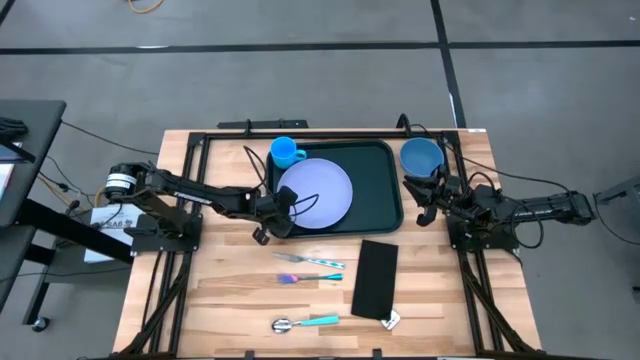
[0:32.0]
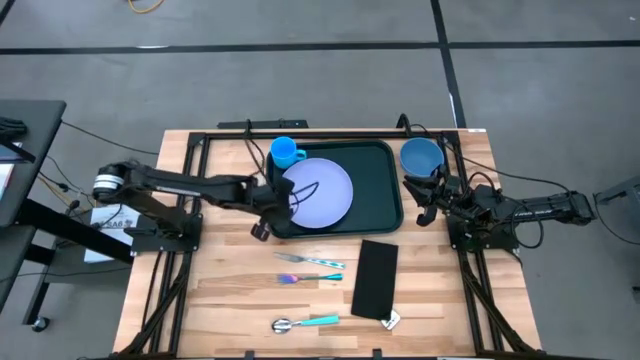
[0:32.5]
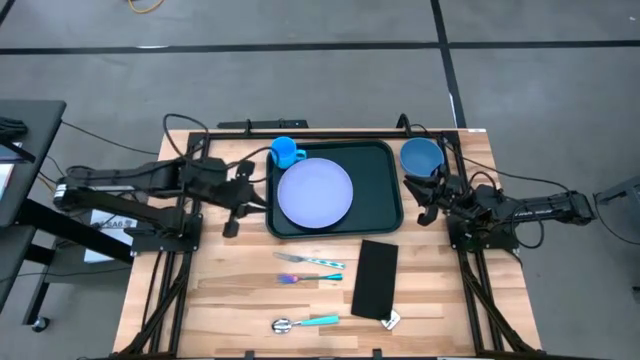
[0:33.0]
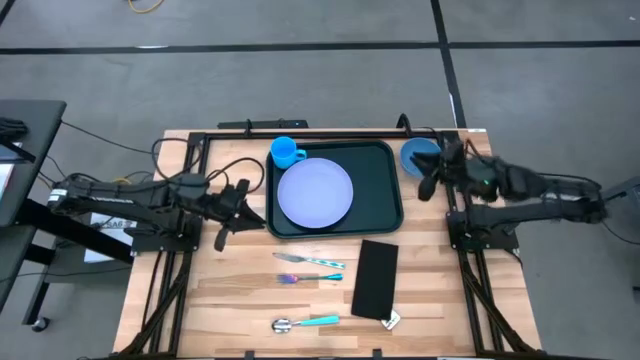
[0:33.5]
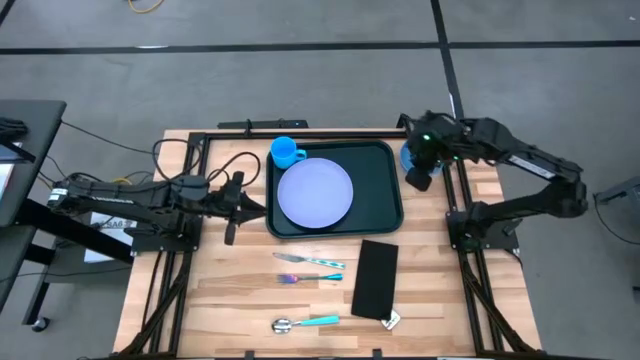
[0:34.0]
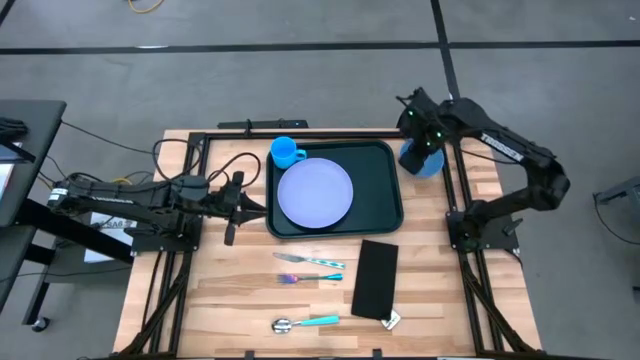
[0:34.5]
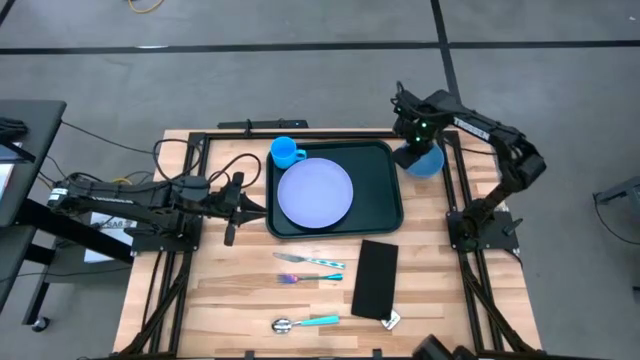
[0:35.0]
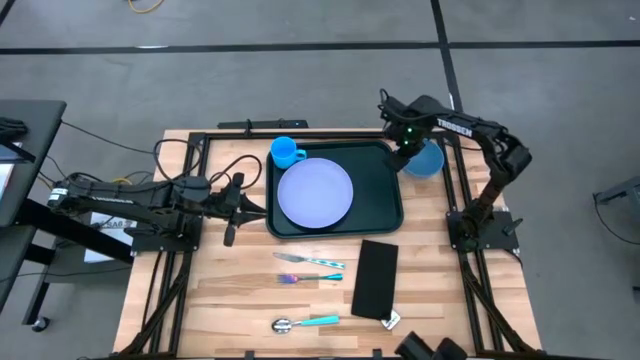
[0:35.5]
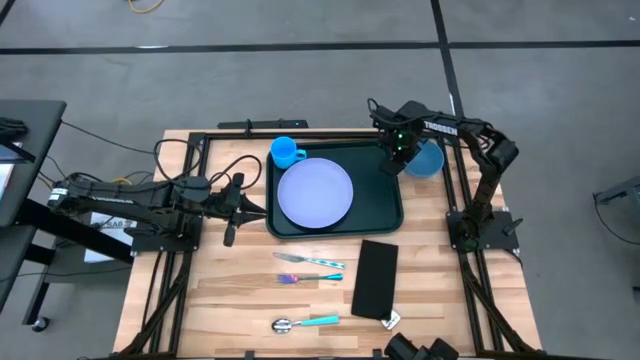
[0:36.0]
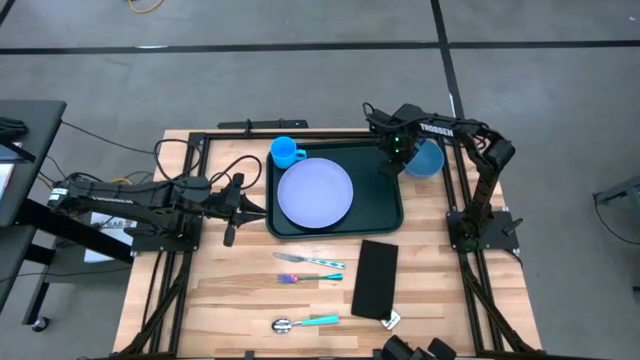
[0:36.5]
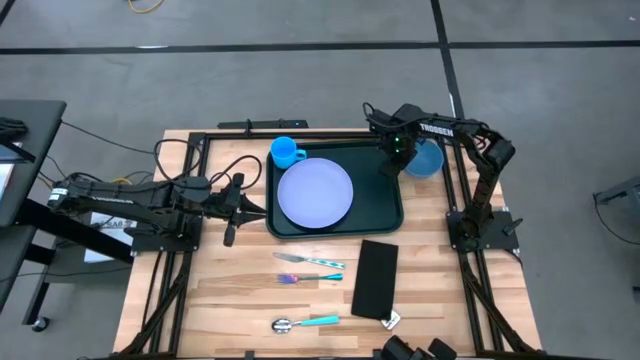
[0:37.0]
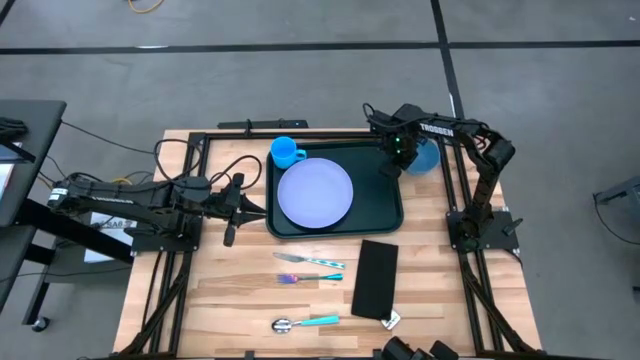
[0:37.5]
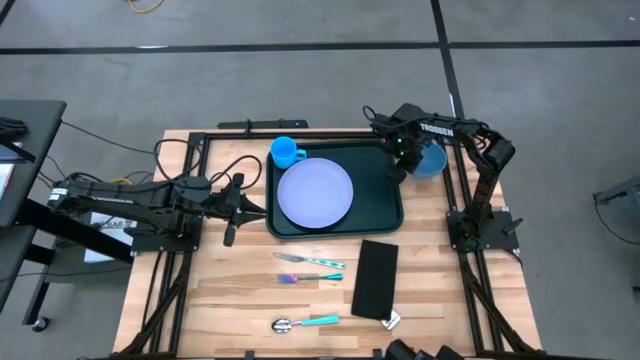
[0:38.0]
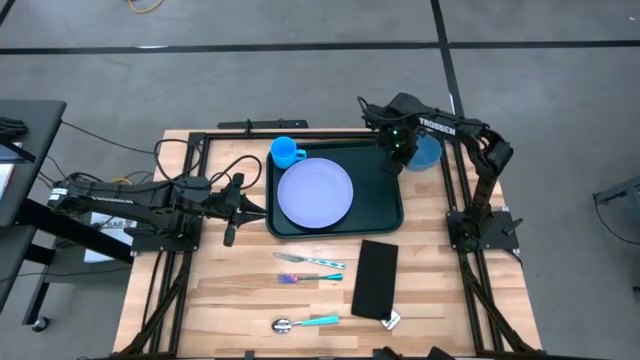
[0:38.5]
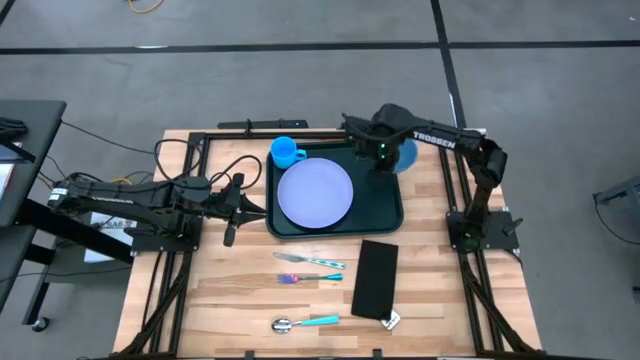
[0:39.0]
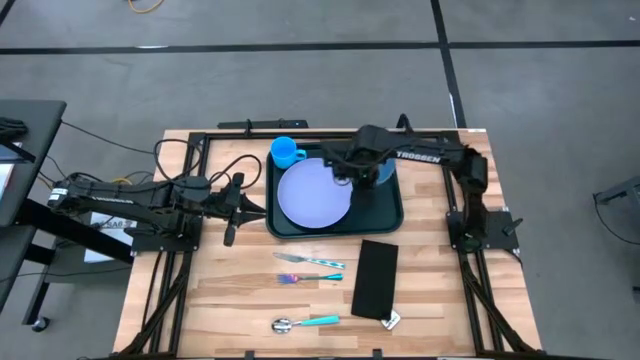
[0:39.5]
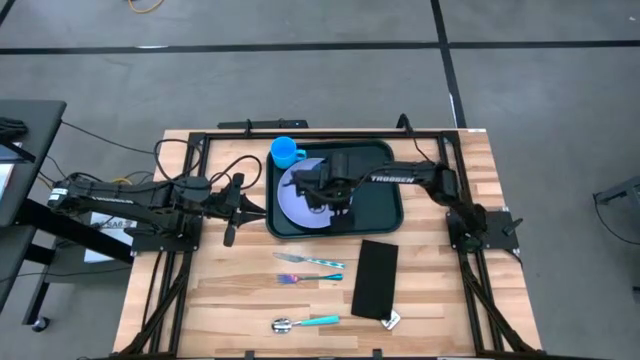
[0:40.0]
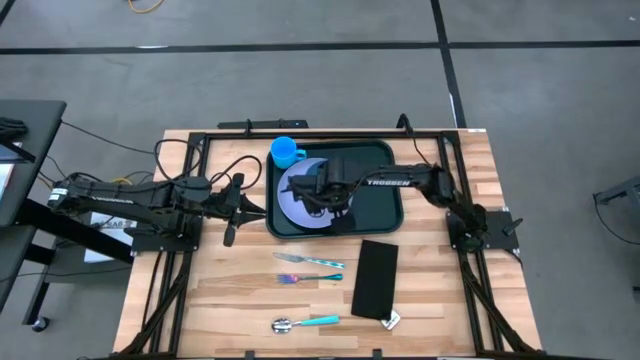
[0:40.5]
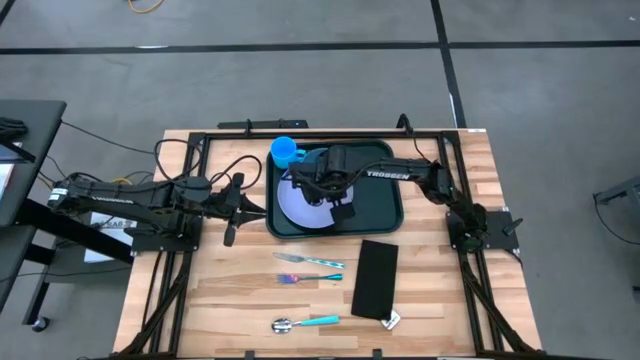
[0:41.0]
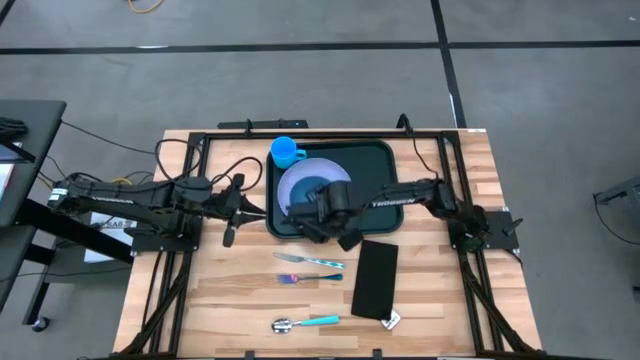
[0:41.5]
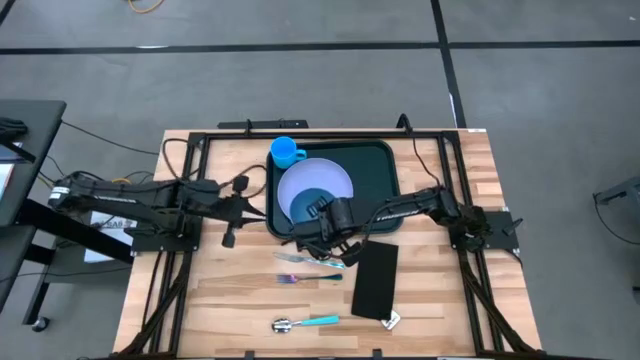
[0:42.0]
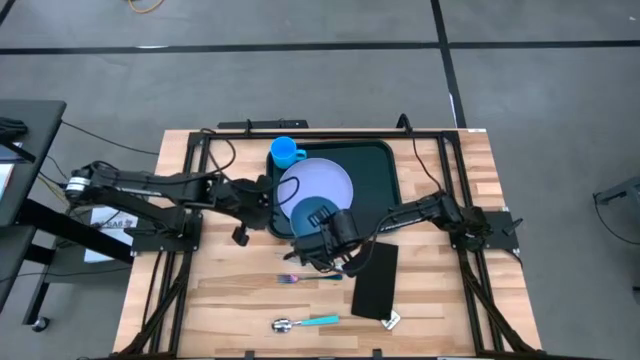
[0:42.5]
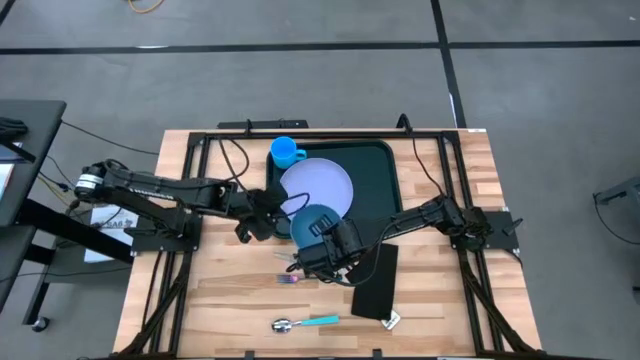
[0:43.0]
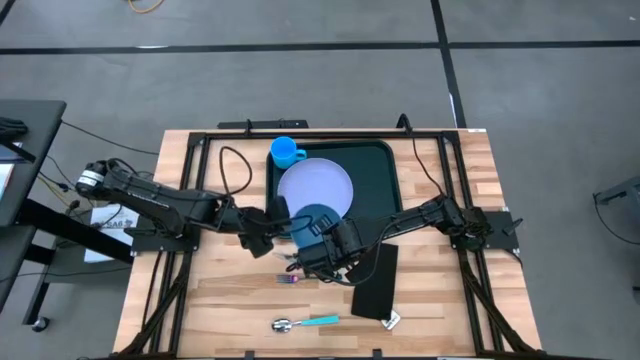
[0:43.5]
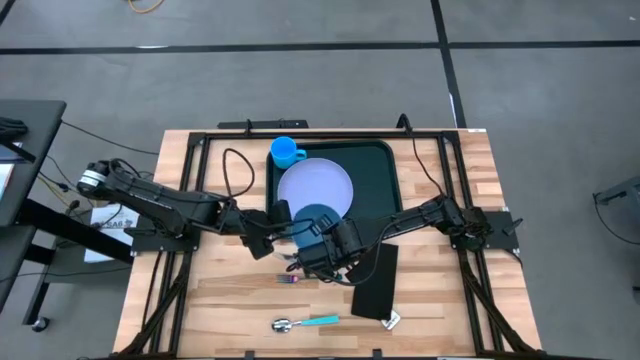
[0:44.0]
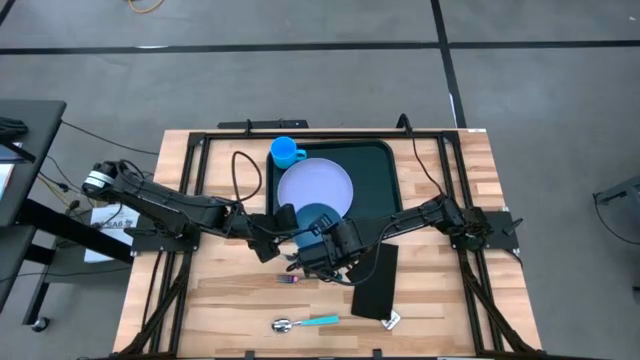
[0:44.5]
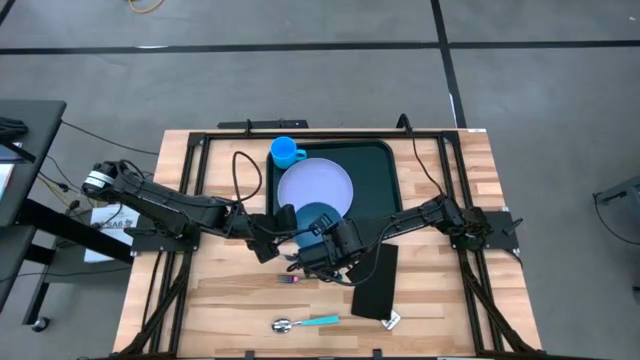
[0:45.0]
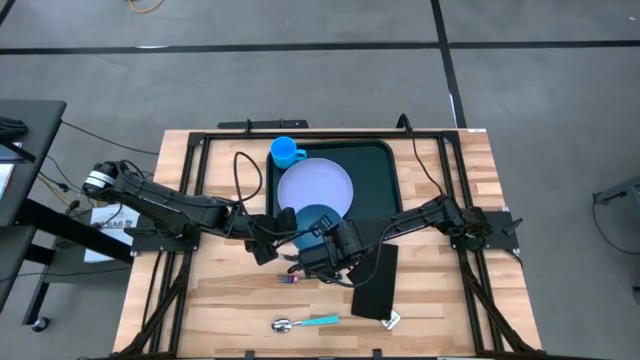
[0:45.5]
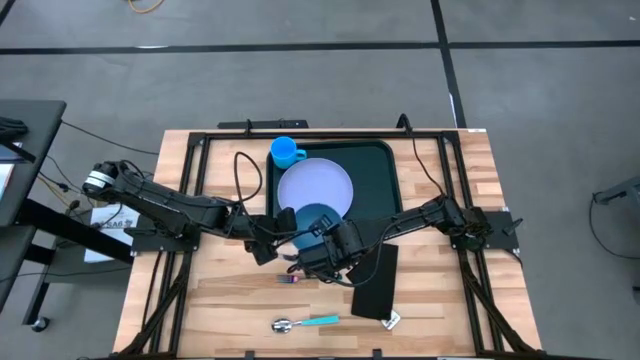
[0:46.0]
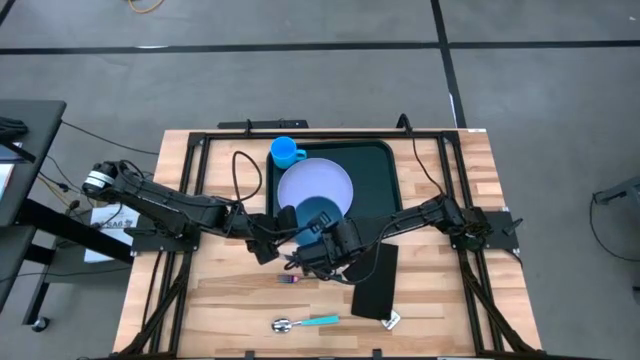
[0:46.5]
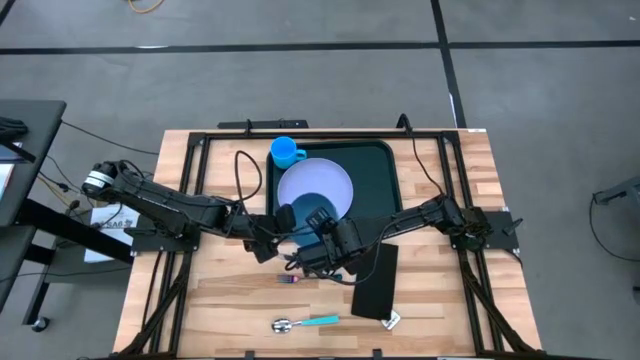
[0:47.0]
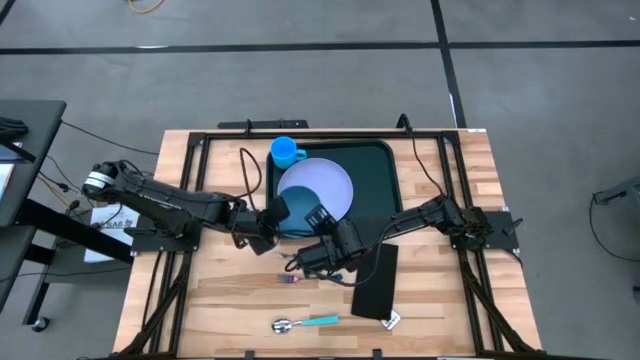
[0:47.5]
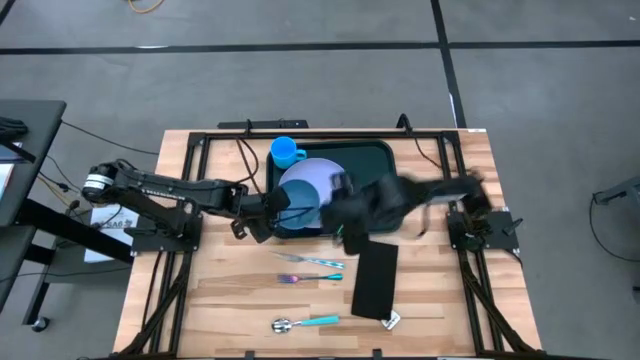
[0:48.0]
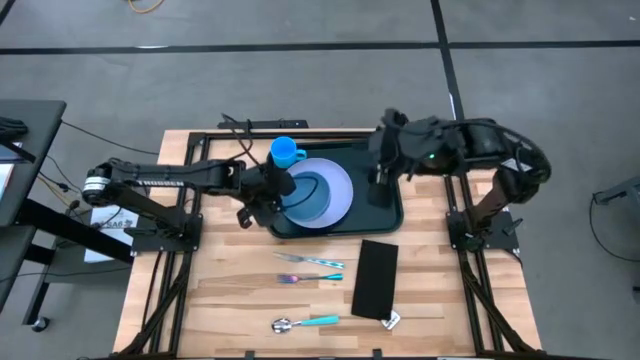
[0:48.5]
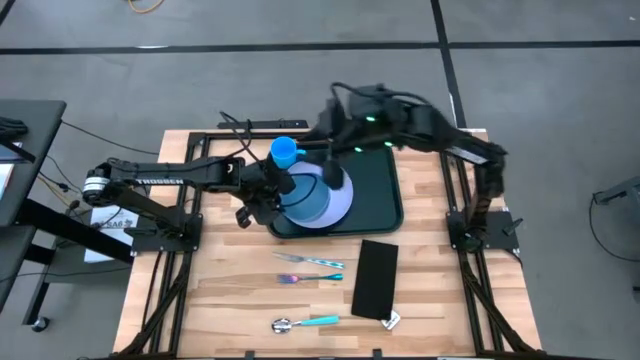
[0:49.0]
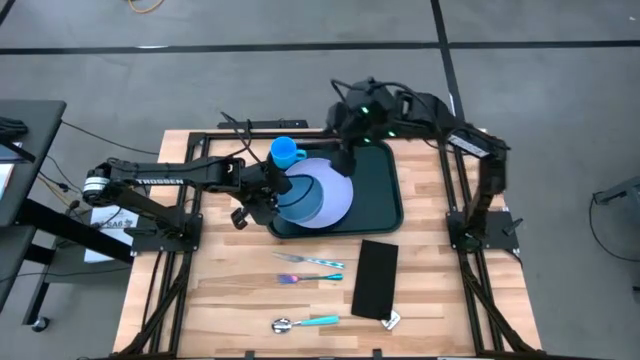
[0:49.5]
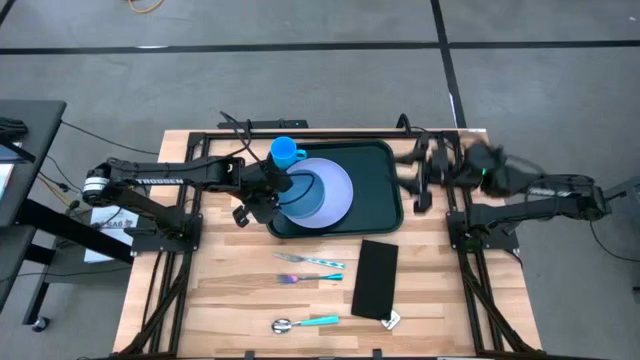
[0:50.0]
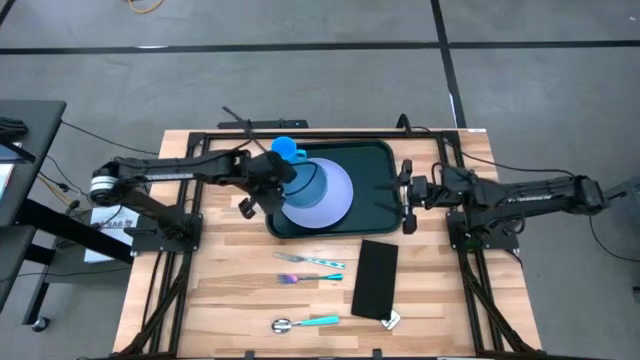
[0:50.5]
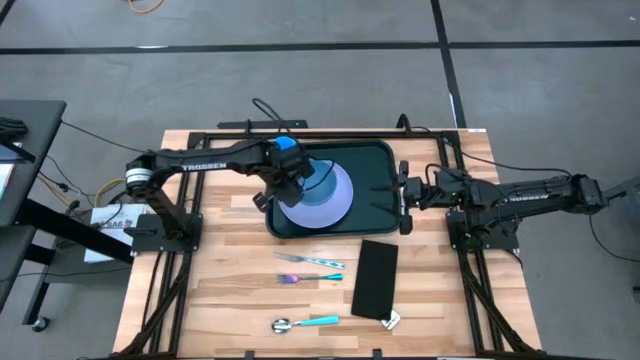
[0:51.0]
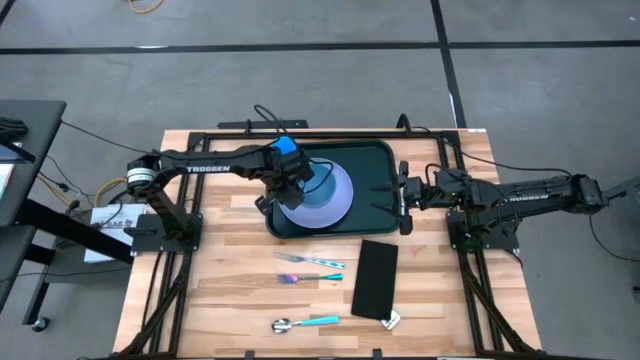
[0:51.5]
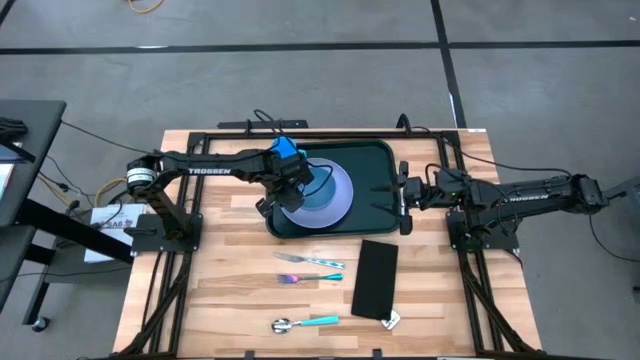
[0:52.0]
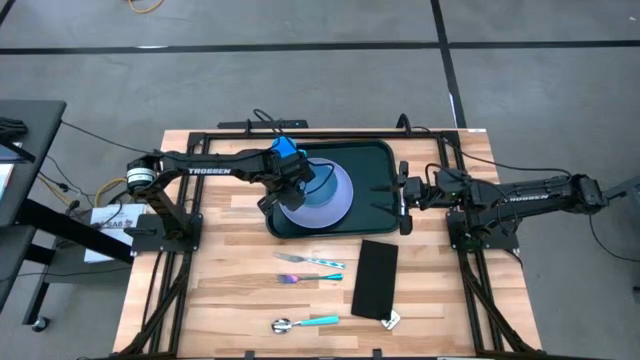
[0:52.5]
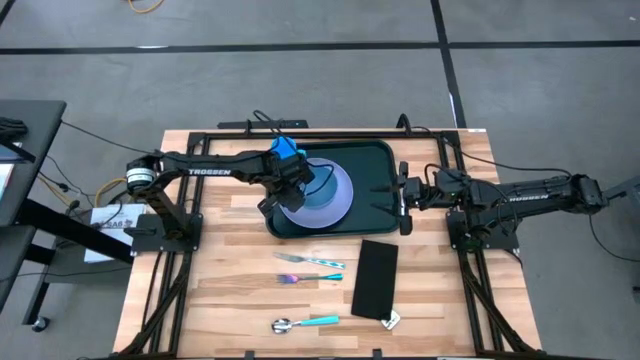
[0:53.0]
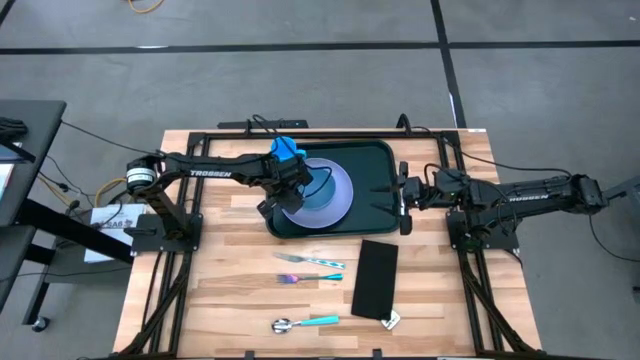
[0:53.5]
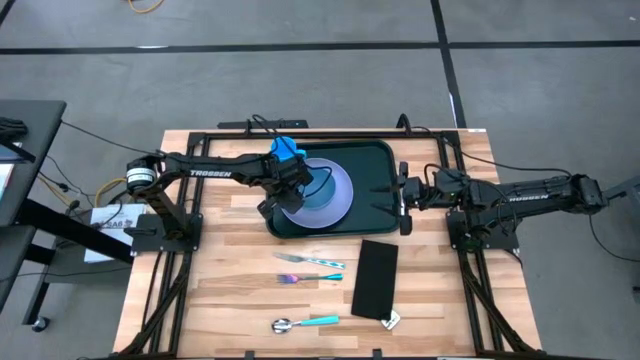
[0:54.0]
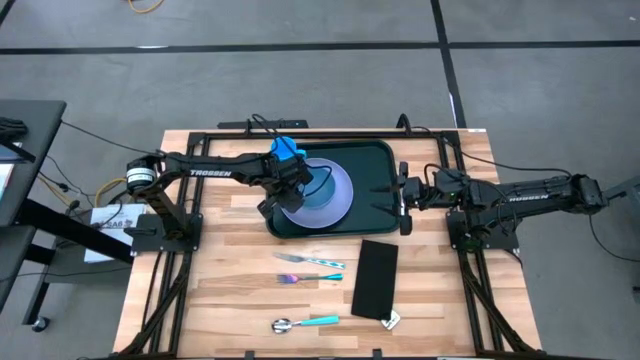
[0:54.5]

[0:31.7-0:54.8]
Task: Set up tray
Put the light blue bowl on the white plate
